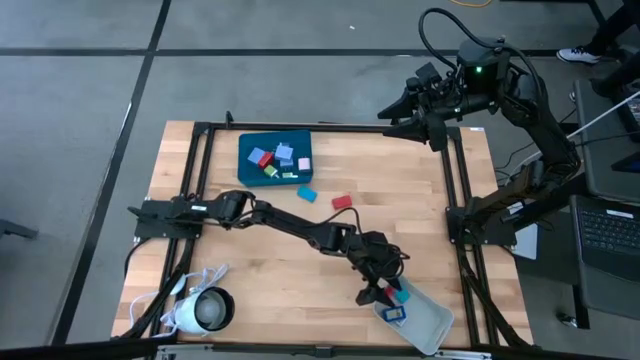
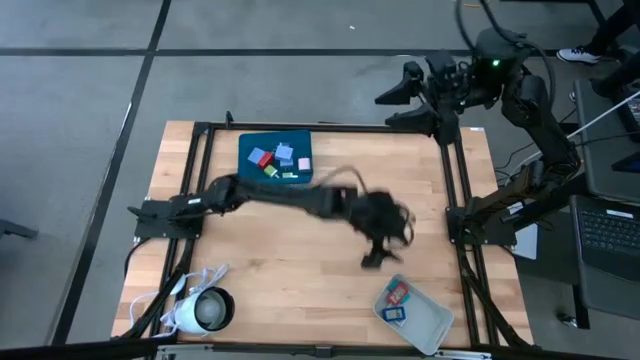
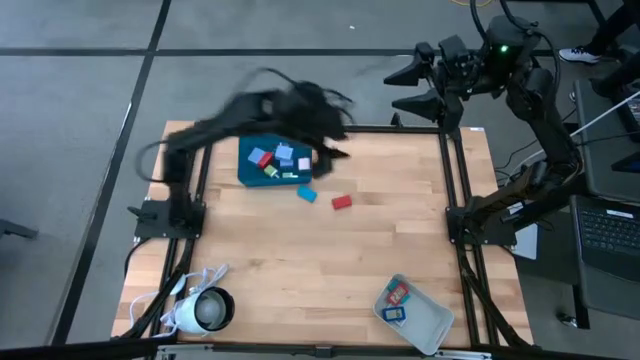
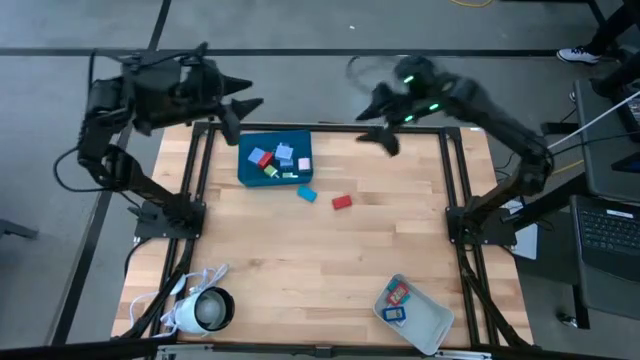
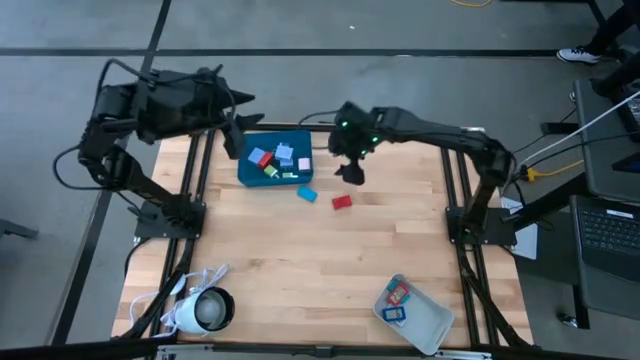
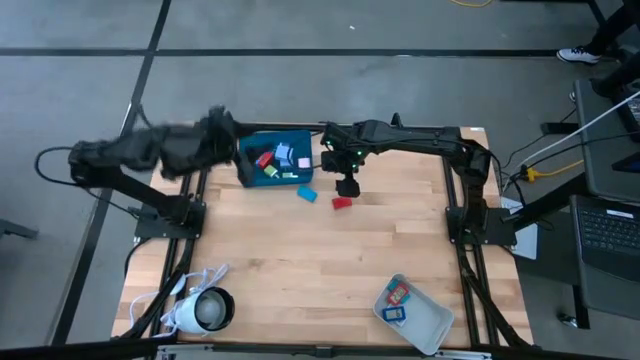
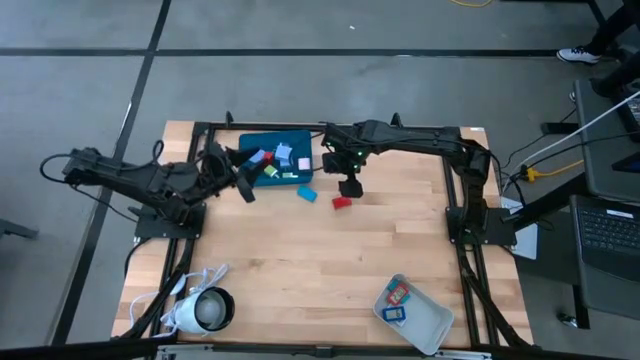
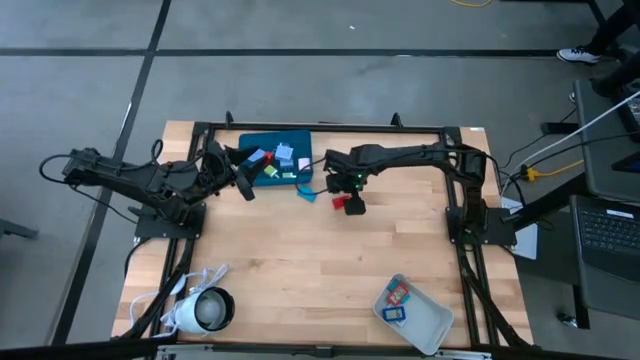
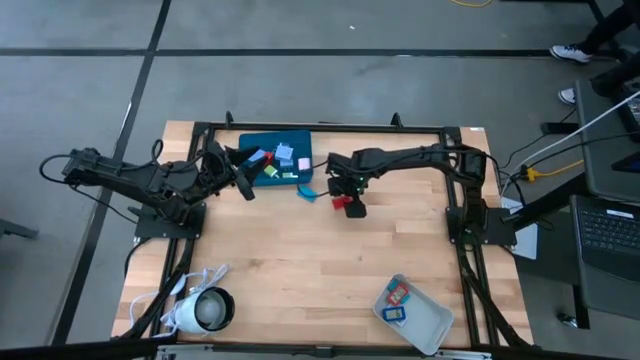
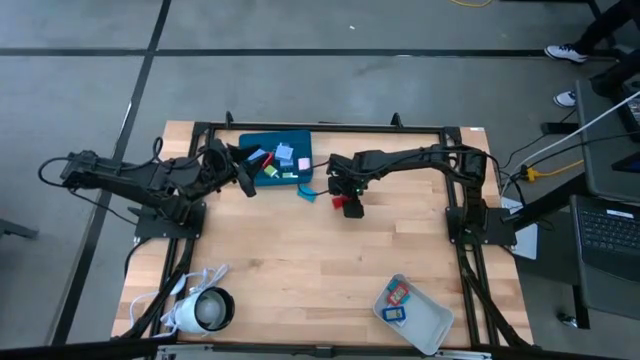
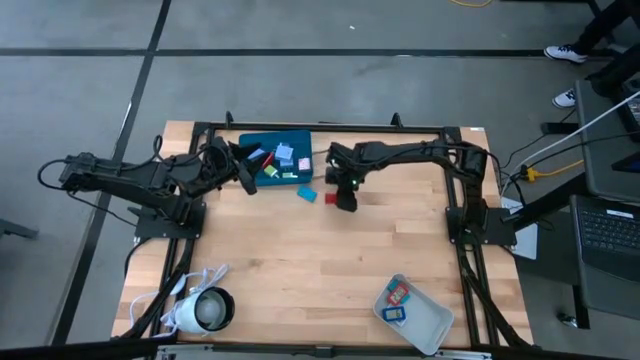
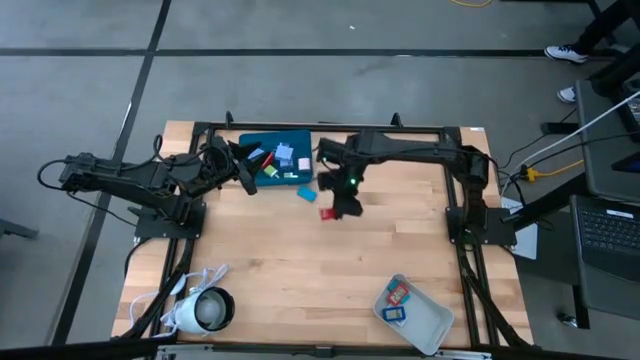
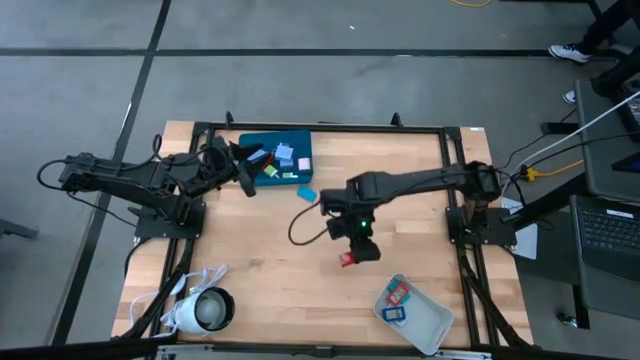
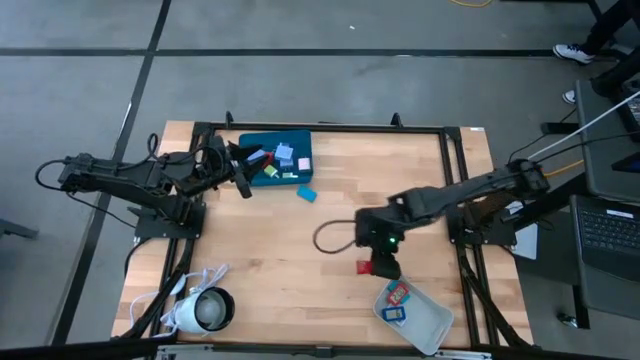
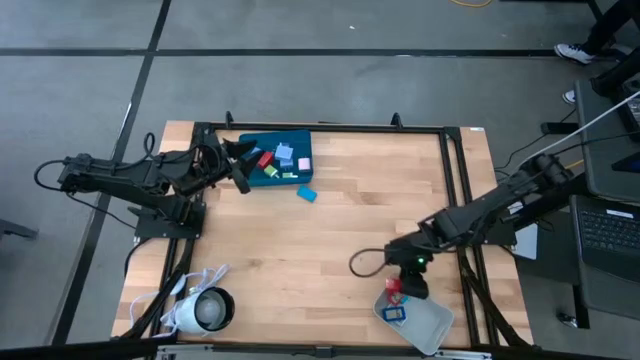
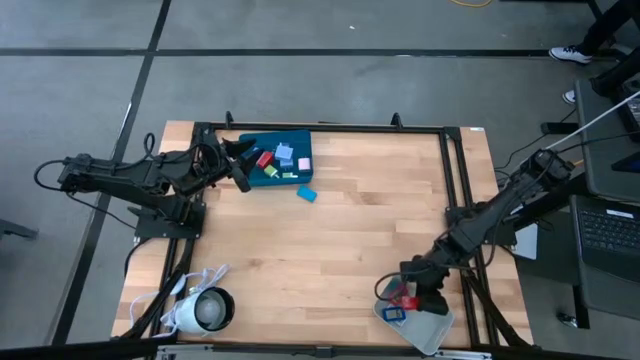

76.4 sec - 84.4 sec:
Task: Pick & Place Office items
Put the red digital clock into the white bin

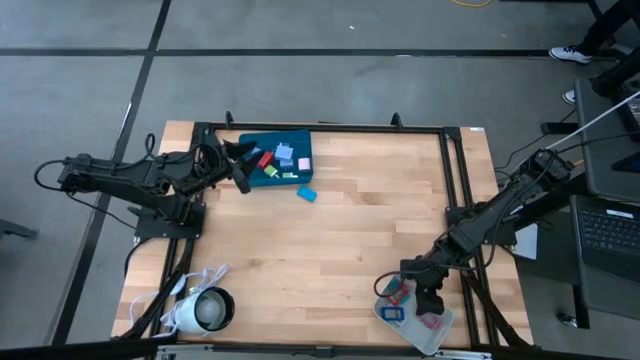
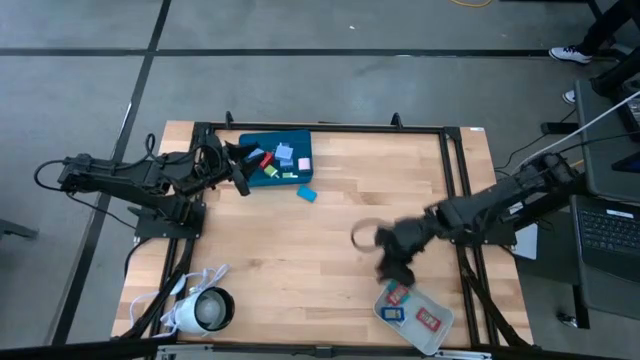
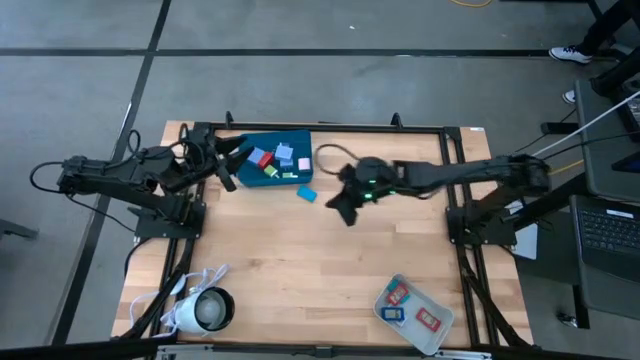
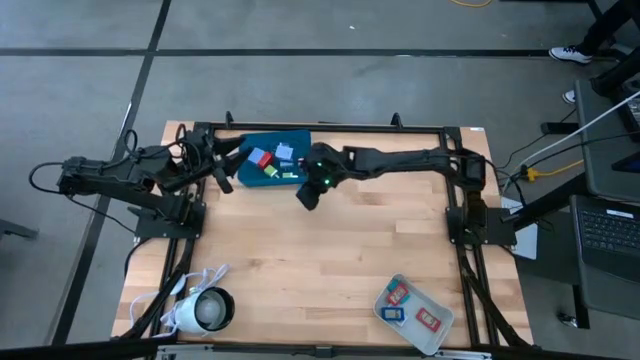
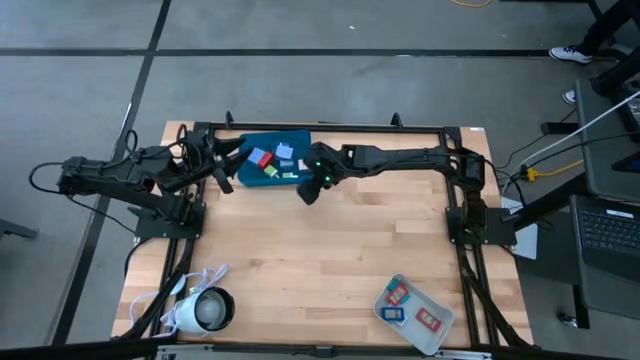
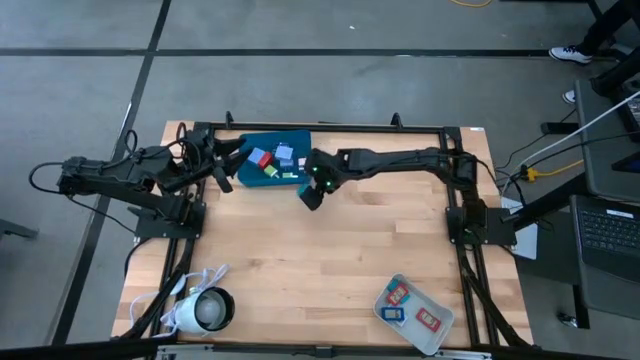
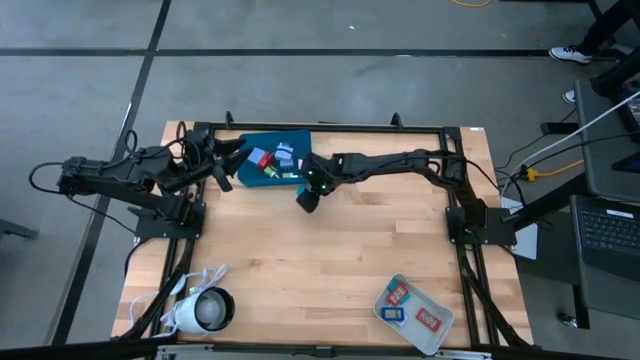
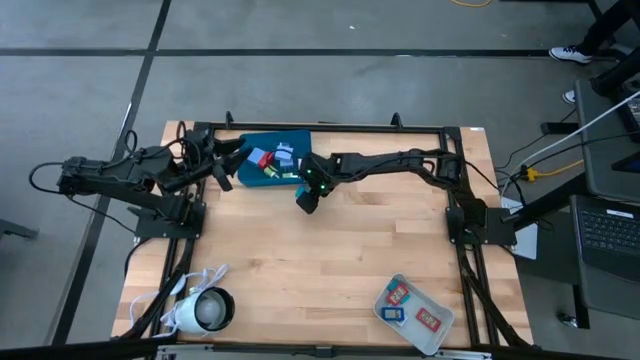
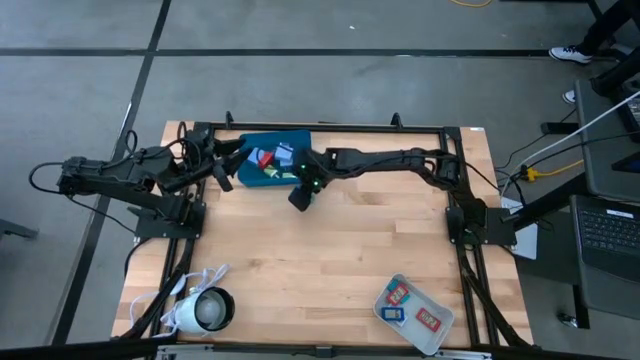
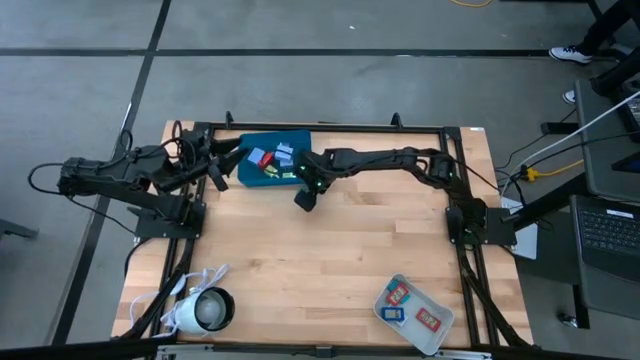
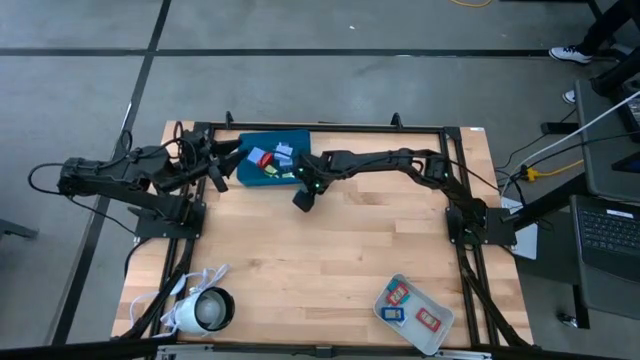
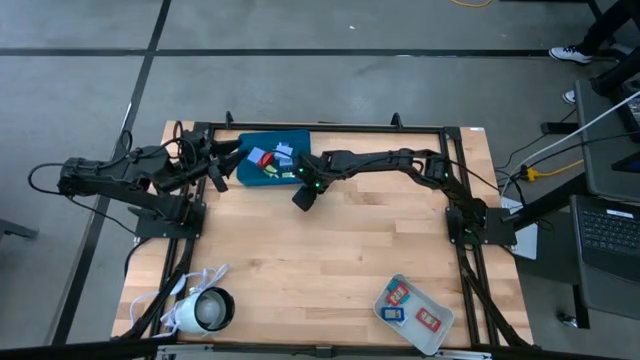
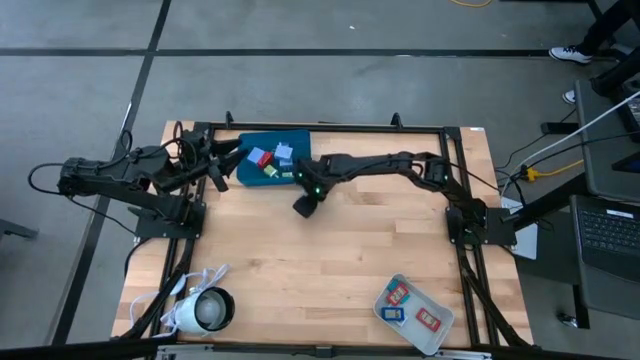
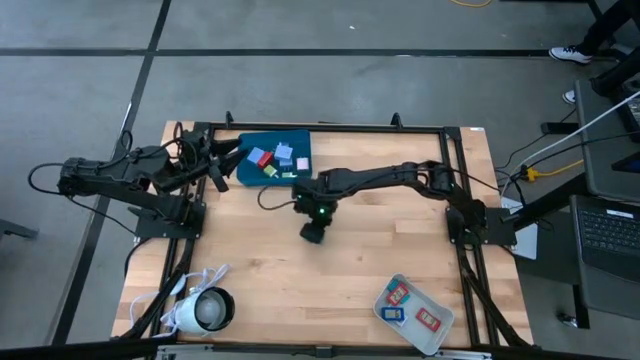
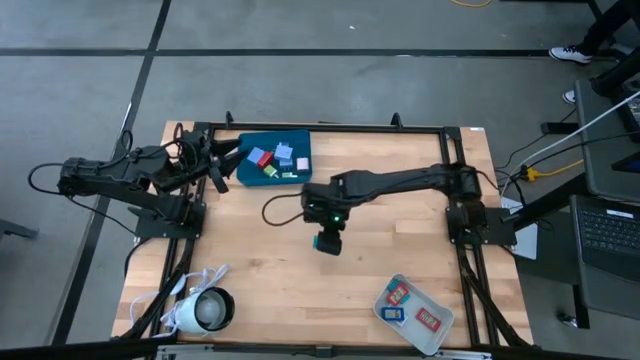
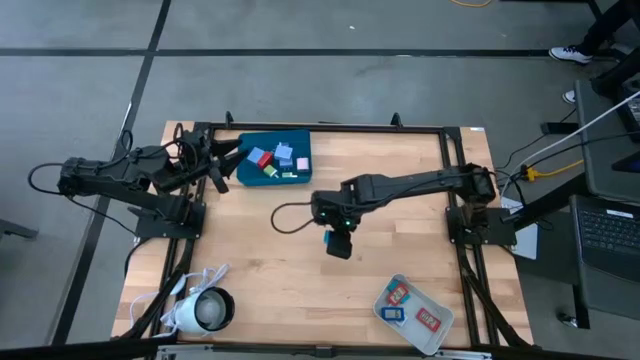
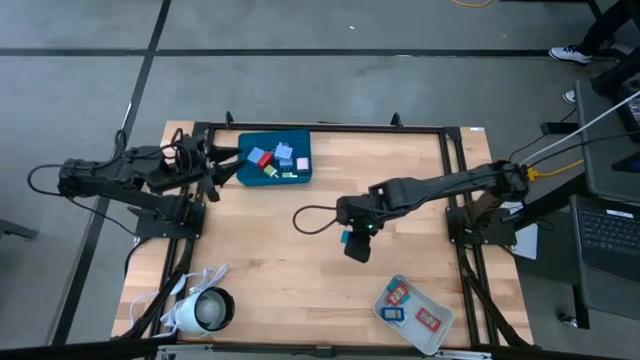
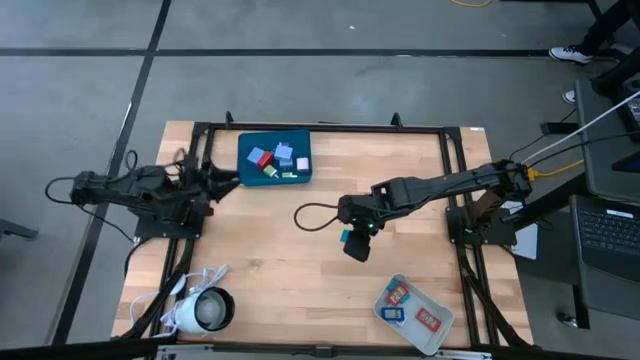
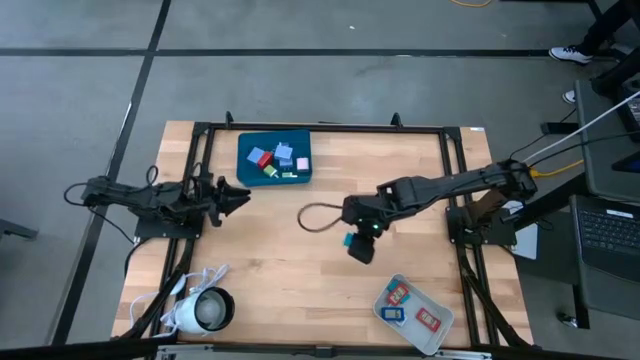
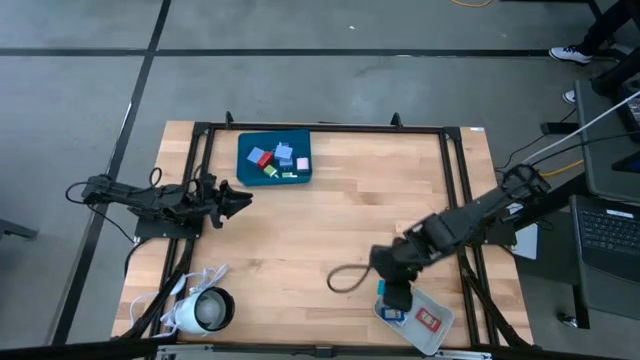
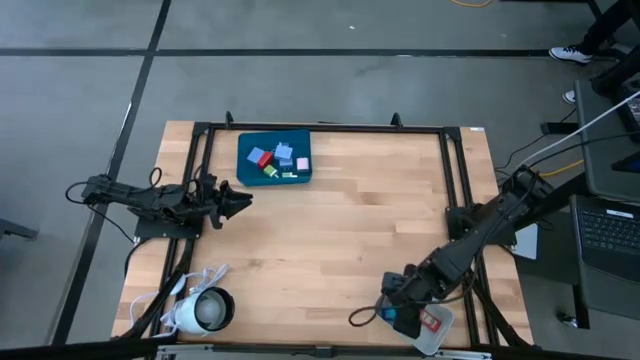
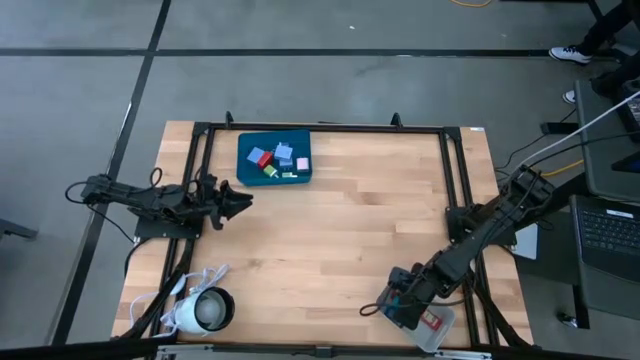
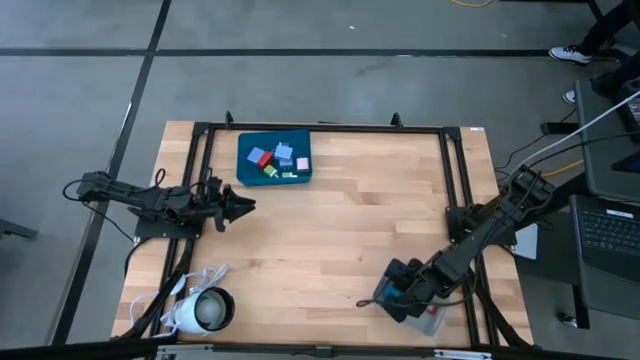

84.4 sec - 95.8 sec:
Put the light blue digital clock into the white bin
